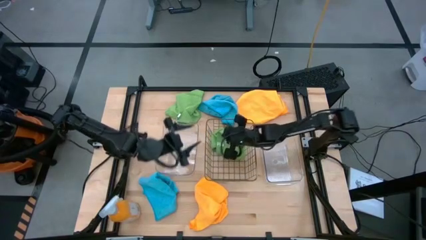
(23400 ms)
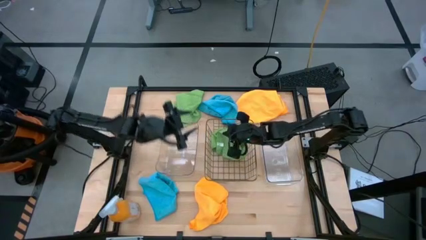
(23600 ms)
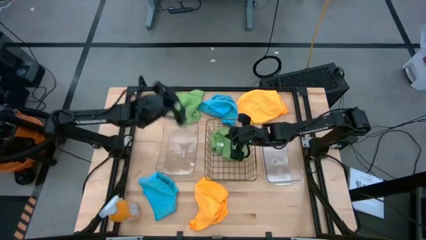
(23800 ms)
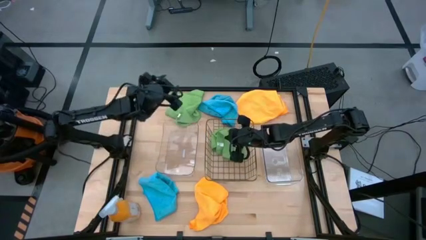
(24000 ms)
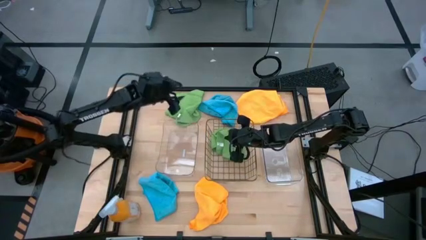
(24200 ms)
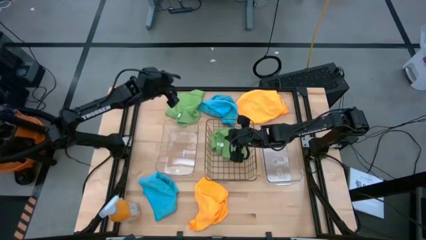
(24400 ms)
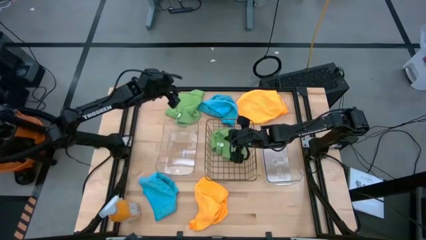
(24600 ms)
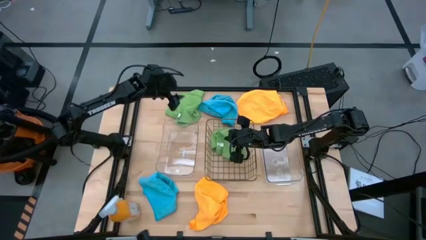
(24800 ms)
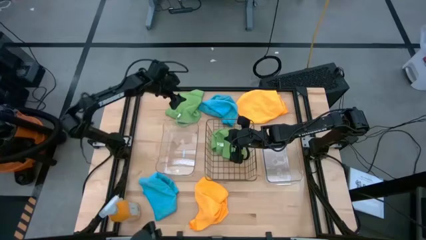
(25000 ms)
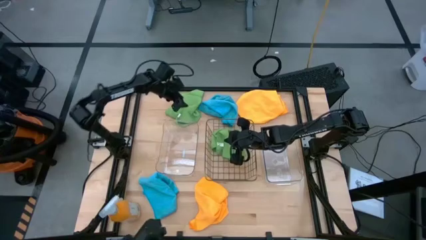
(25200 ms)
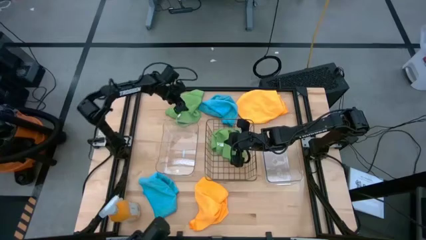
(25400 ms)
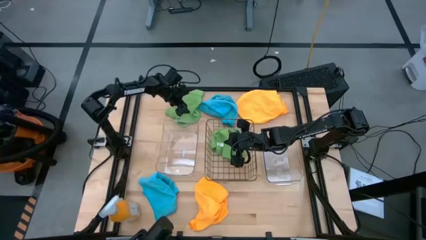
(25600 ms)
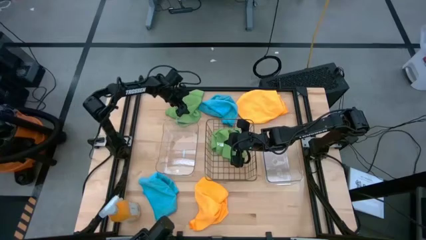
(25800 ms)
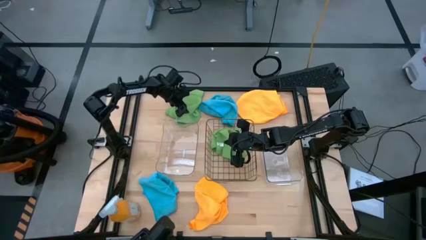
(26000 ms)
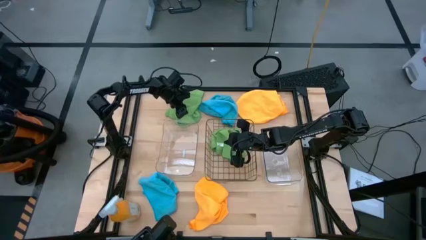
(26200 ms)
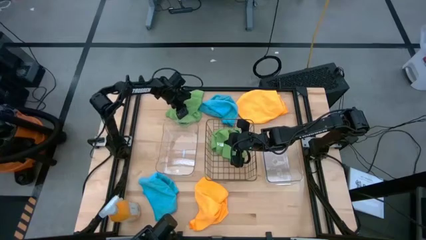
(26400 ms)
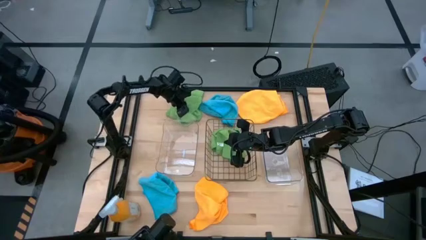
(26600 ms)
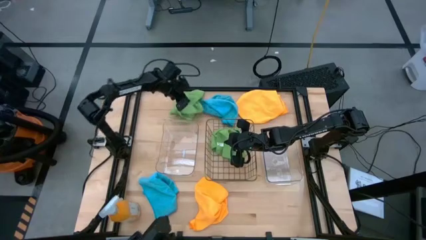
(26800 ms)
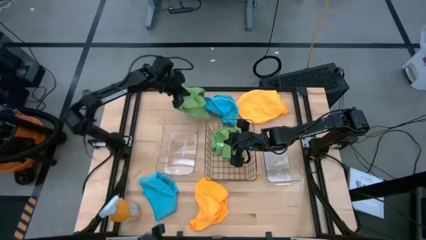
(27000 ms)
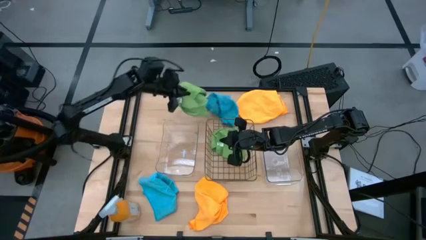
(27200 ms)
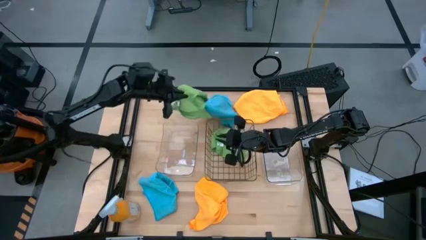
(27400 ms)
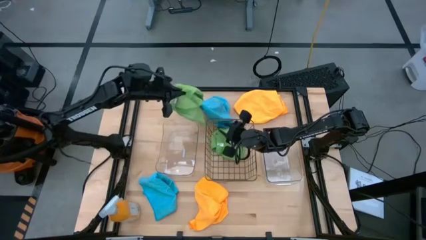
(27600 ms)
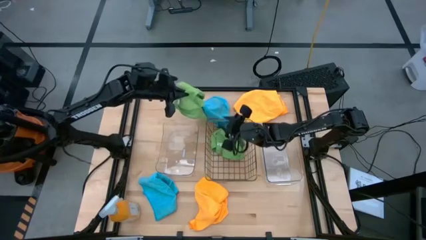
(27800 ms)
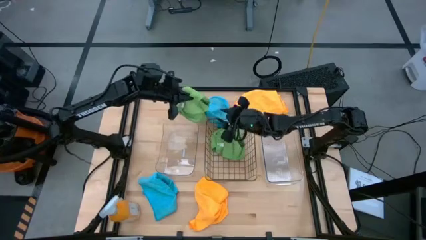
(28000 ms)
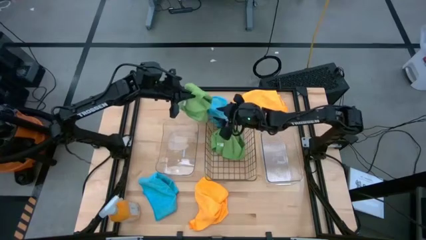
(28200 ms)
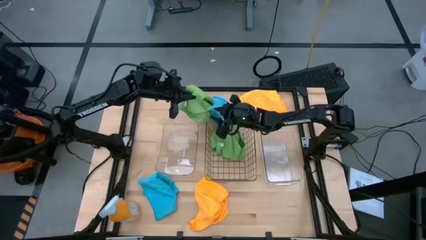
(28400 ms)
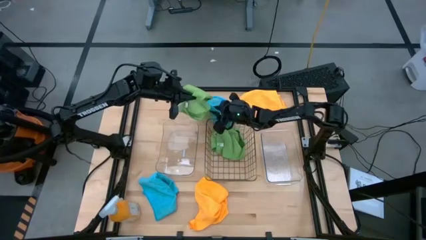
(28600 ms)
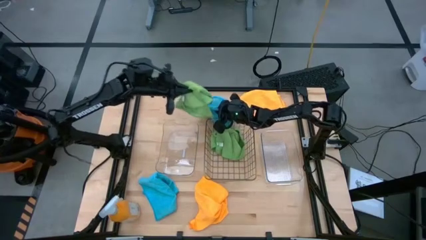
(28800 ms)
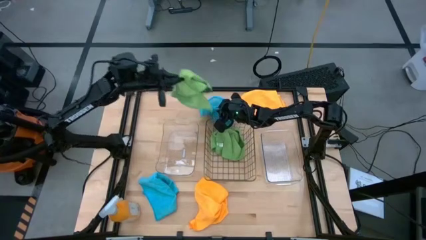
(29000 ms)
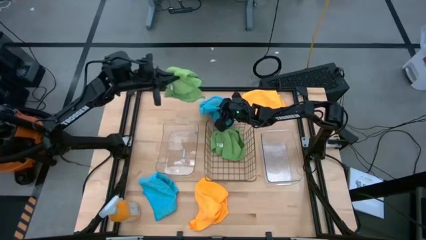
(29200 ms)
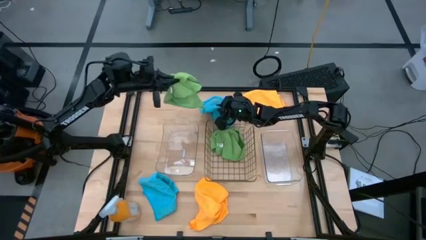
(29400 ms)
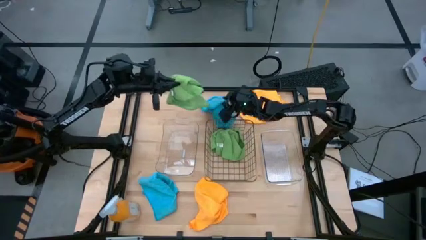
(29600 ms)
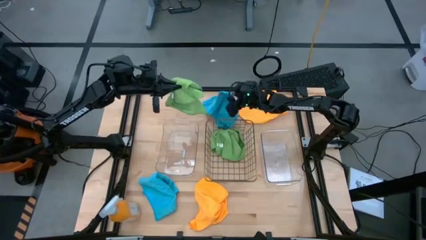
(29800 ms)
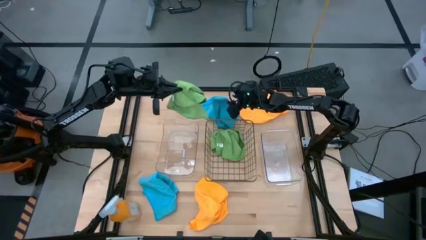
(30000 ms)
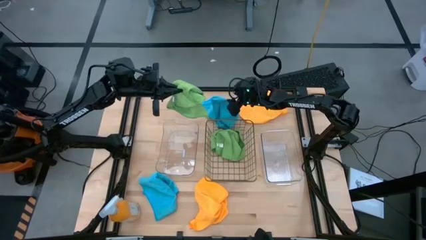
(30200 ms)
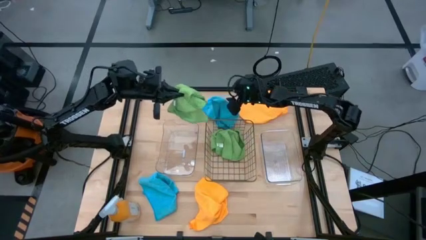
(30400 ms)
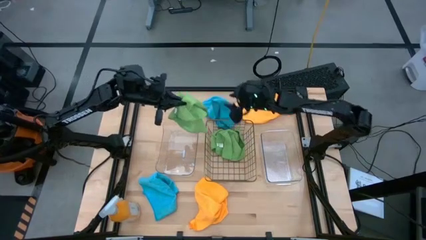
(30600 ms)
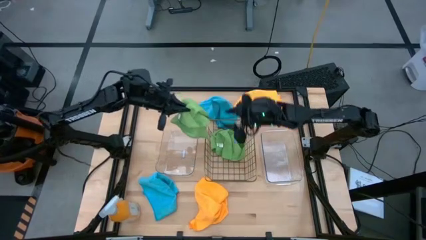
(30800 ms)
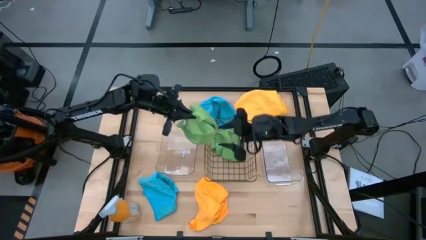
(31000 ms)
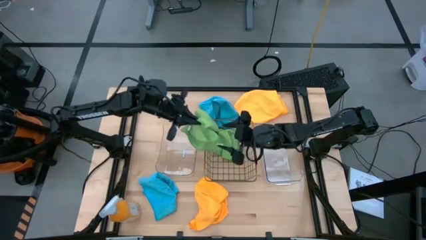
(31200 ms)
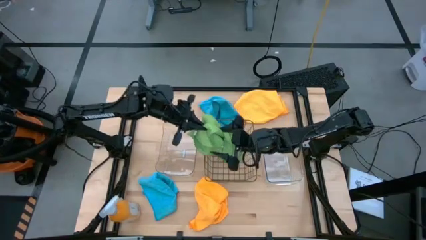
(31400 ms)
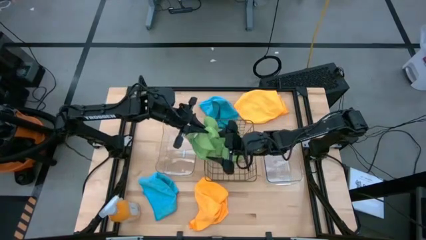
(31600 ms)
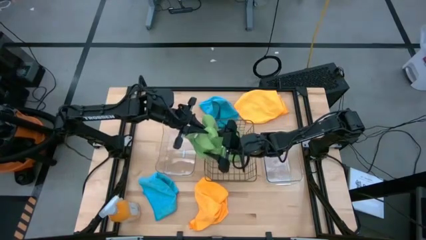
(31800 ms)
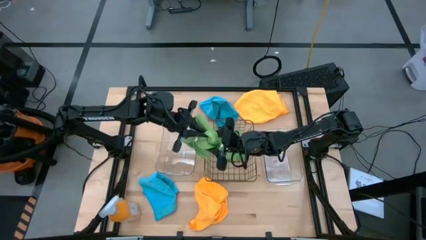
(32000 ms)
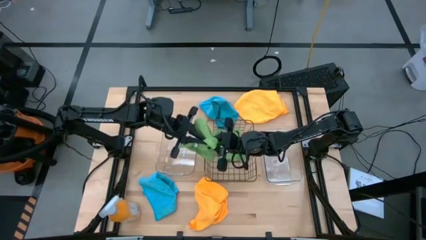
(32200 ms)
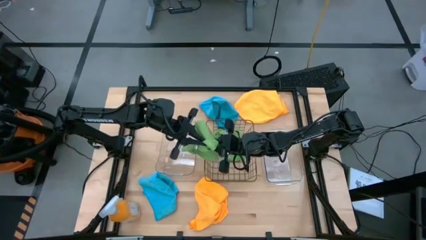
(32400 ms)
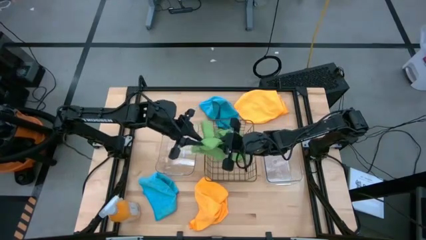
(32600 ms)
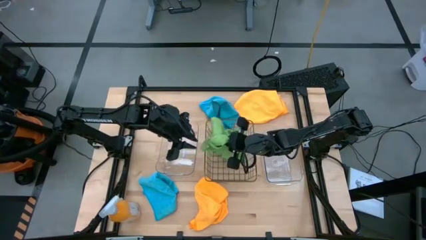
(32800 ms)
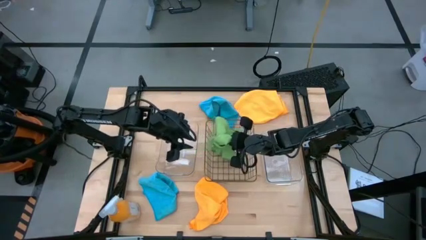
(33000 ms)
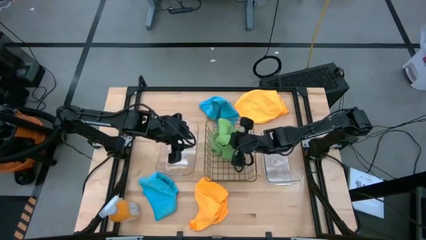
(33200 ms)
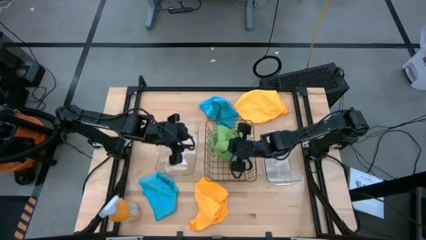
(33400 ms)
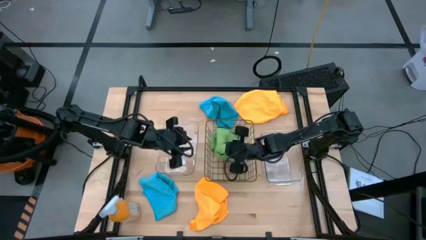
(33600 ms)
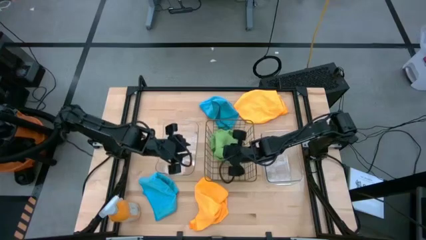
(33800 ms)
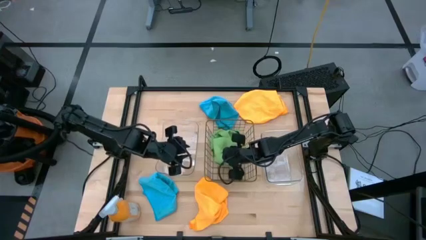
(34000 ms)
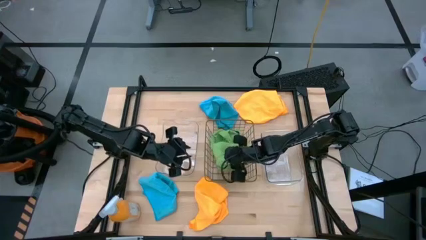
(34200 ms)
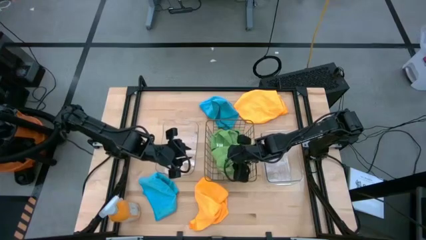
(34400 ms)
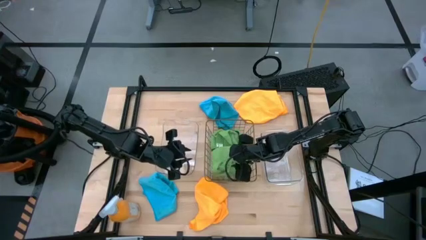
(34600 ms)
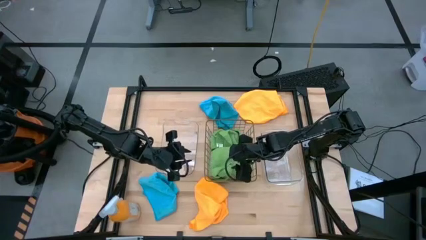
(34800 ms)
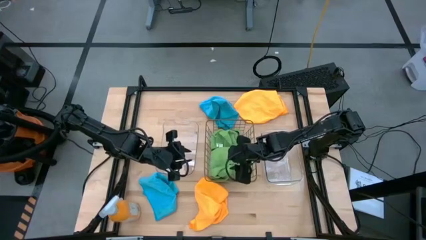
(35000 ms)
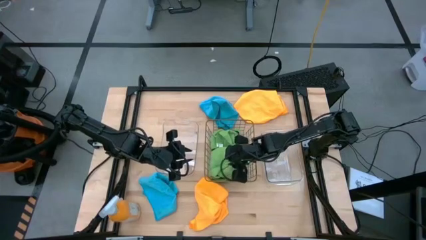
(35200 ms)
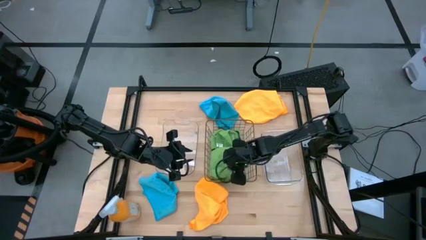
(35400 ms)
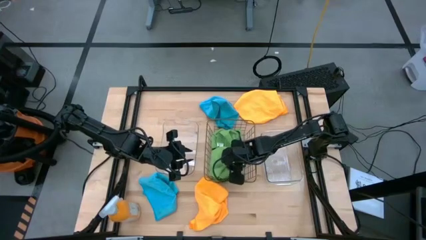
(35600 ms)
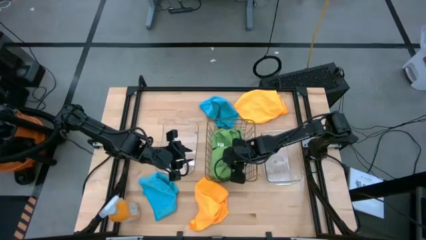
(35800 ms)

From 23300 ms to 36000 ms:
Task: Sort microfiber towel by color & place in baskets
Put the green microfiber towel into the wire basket
